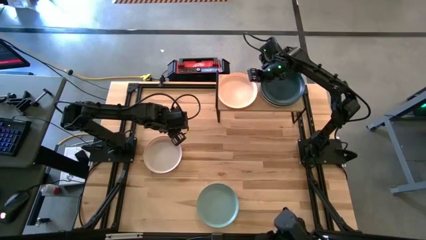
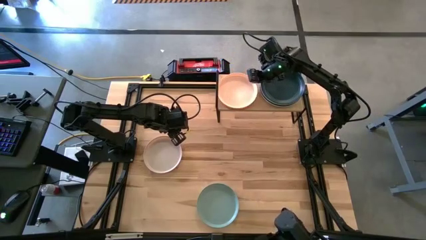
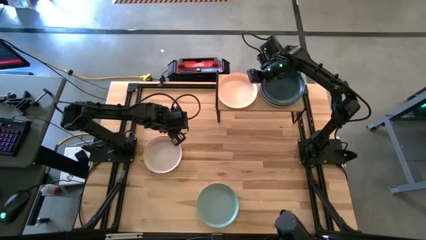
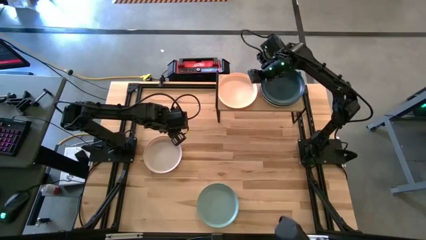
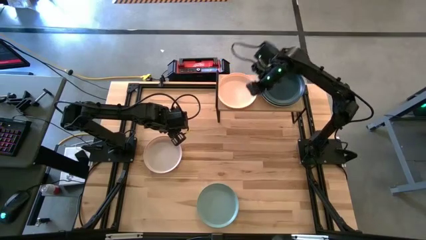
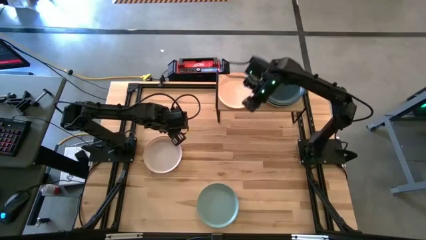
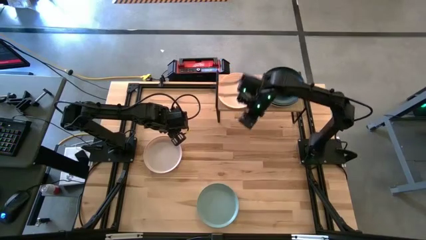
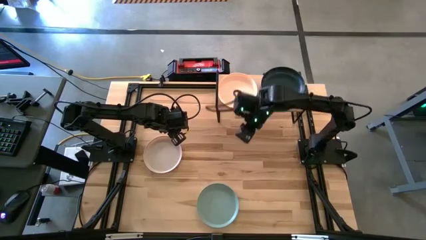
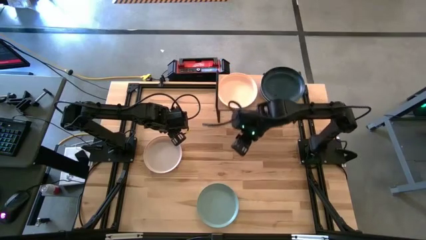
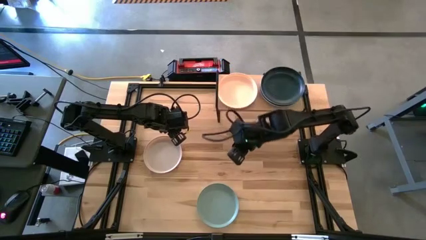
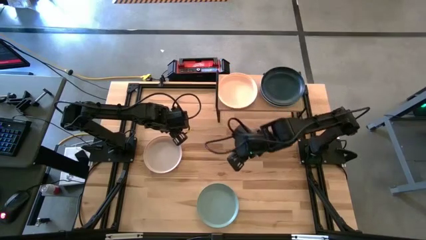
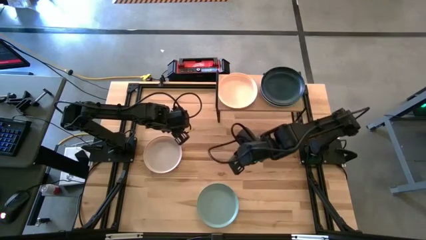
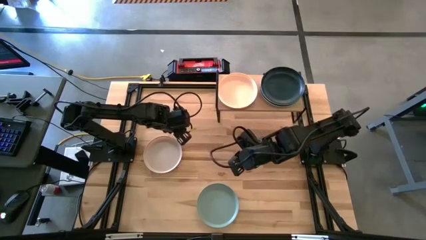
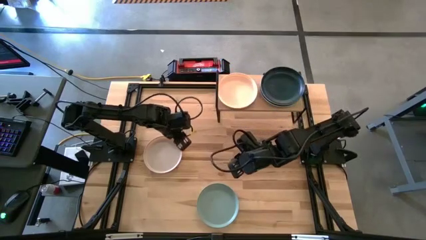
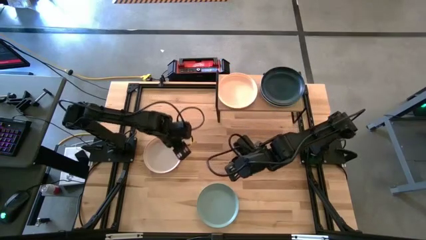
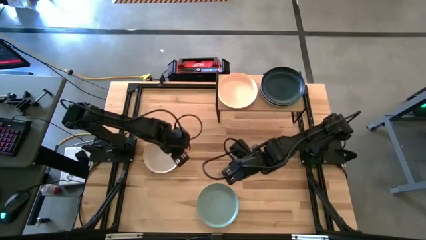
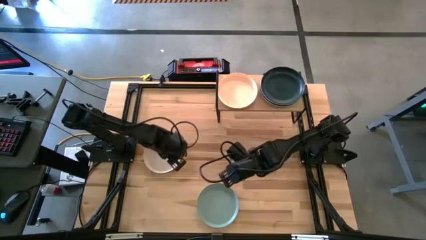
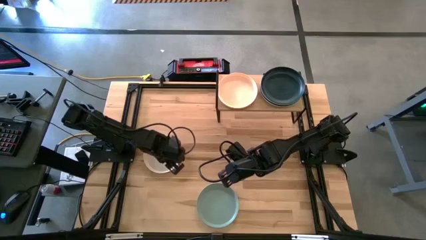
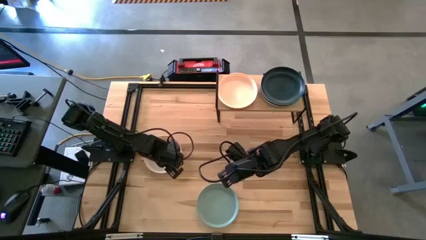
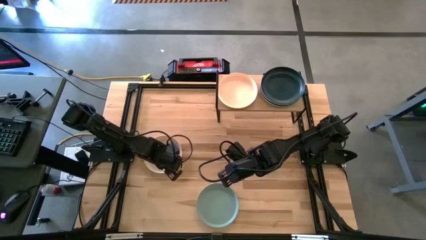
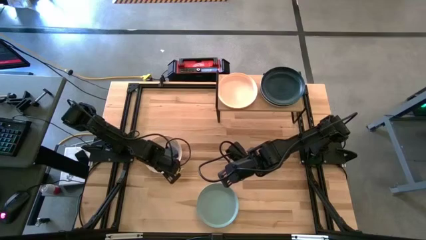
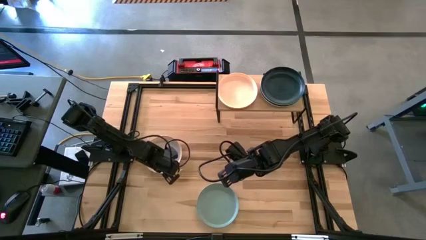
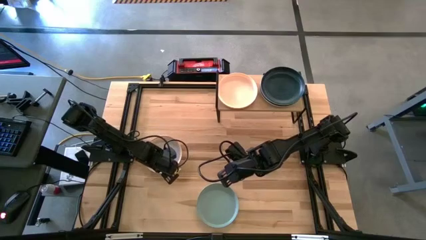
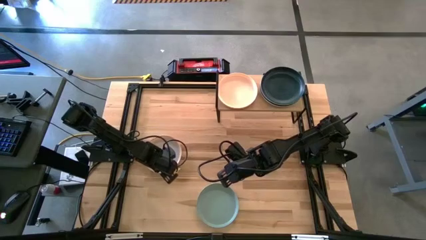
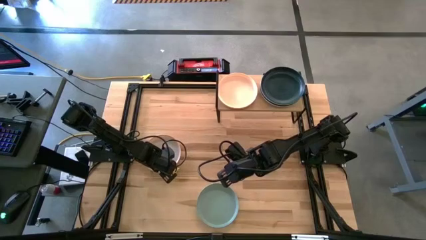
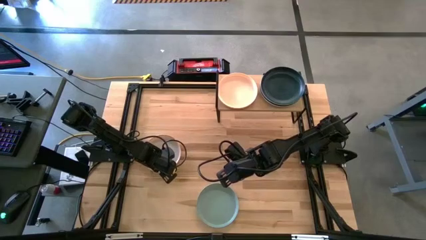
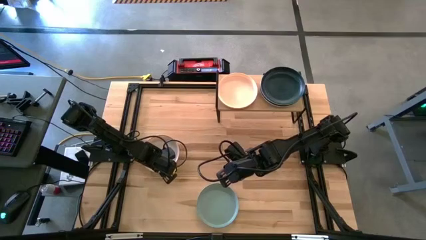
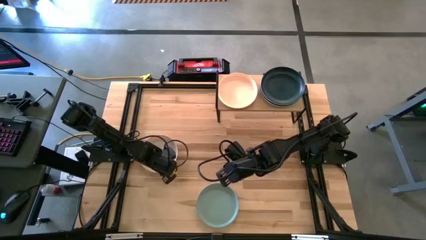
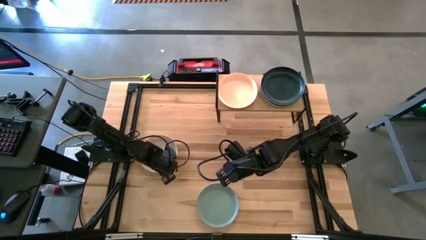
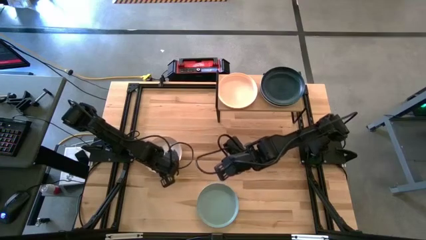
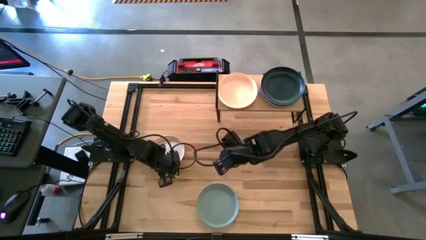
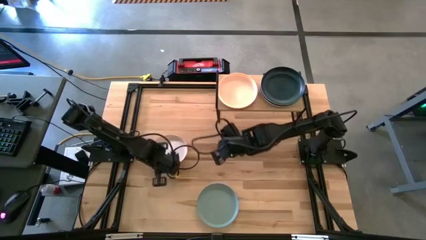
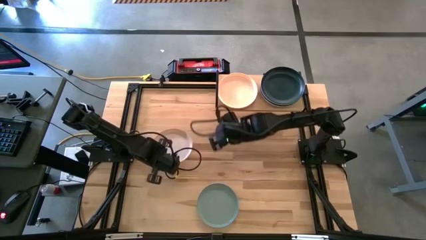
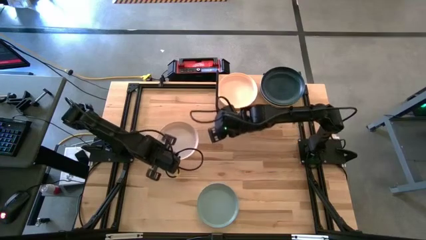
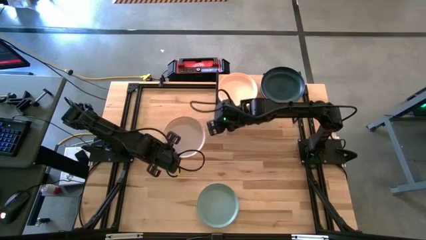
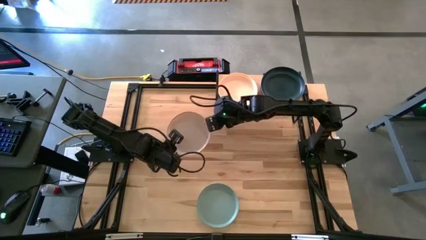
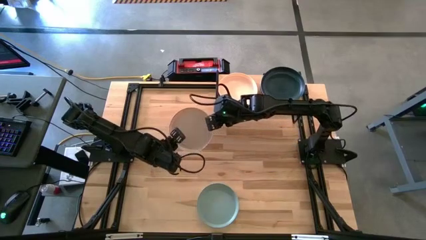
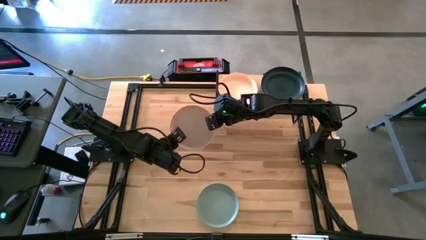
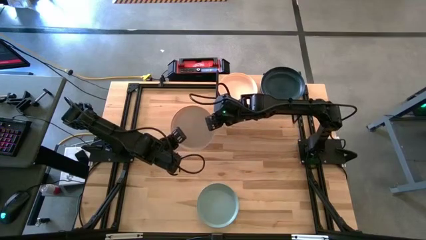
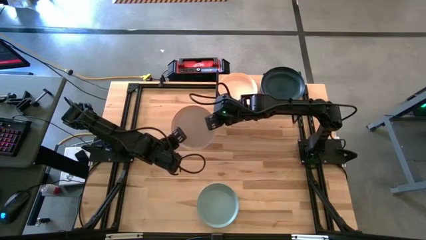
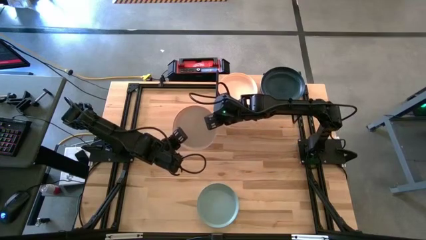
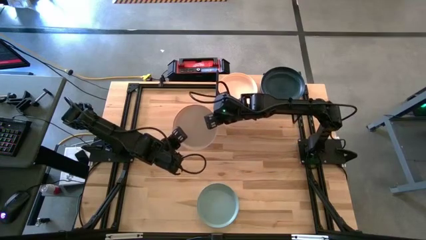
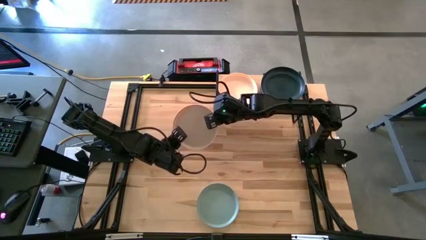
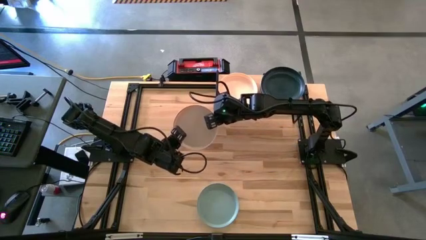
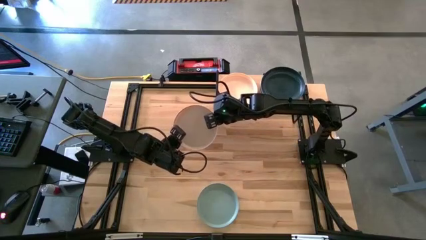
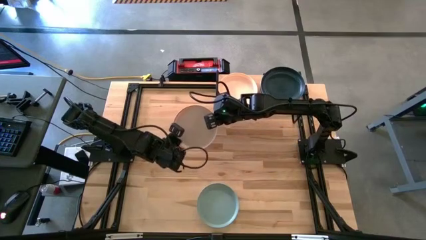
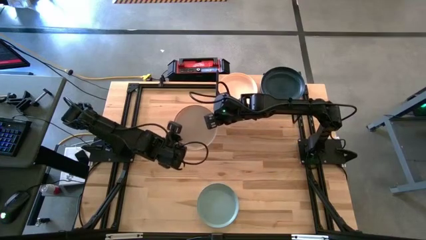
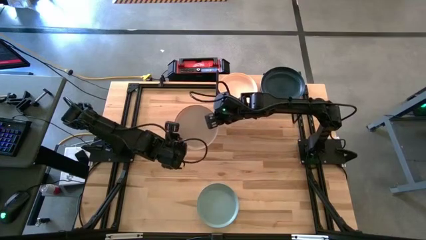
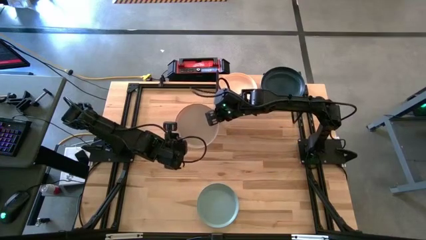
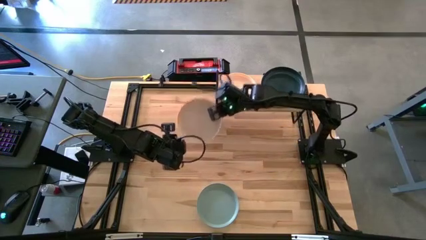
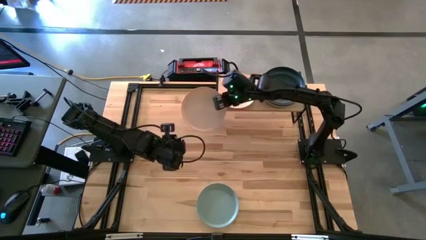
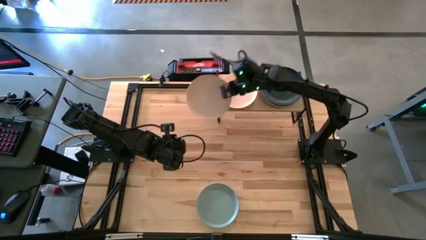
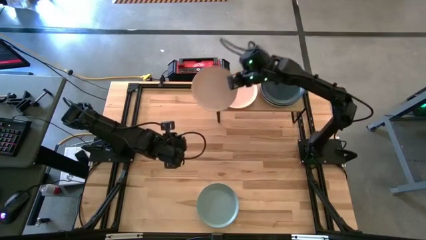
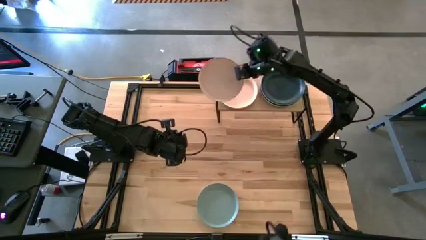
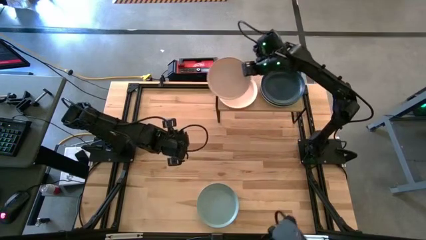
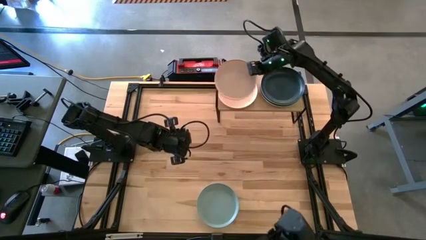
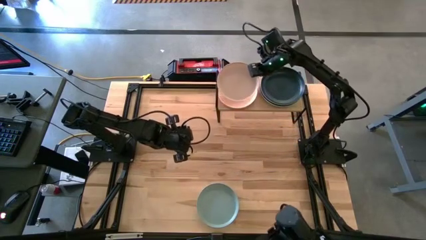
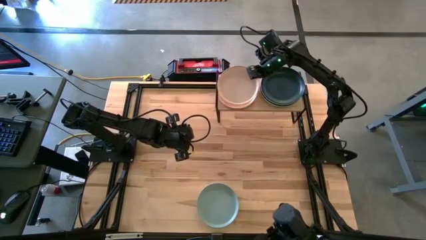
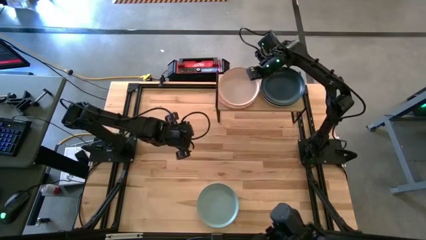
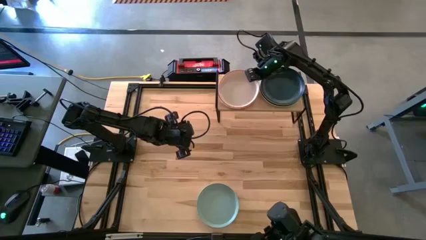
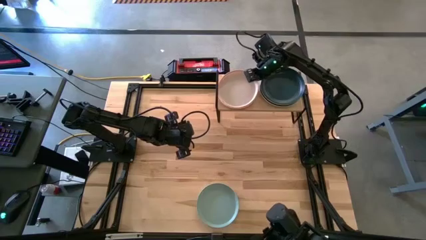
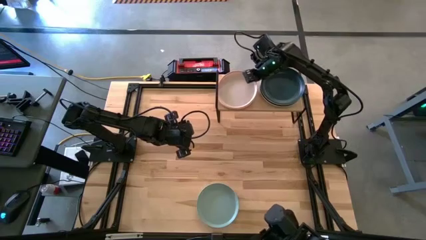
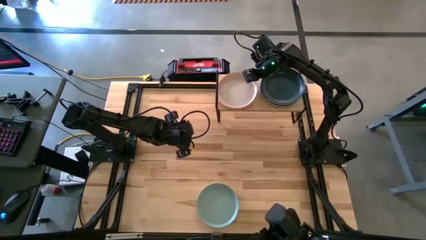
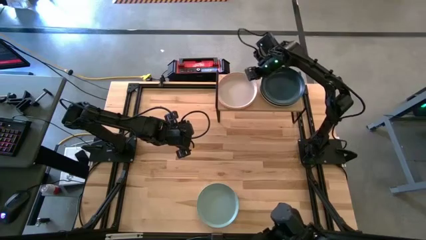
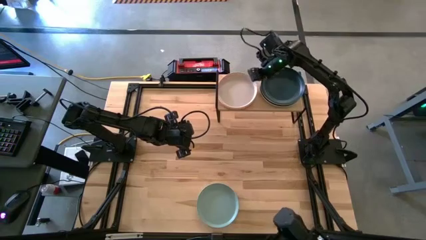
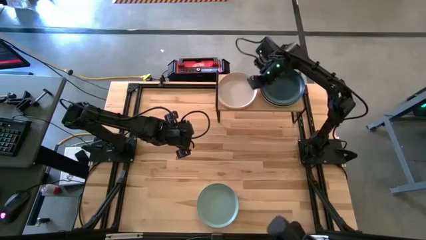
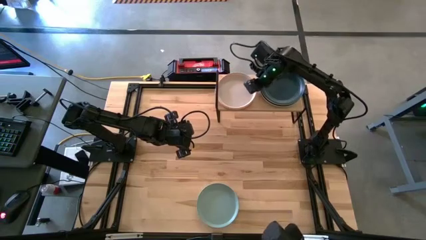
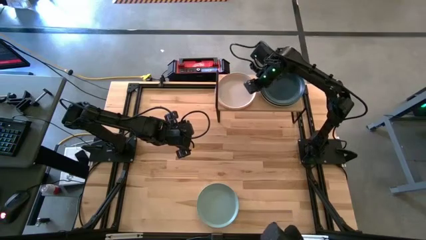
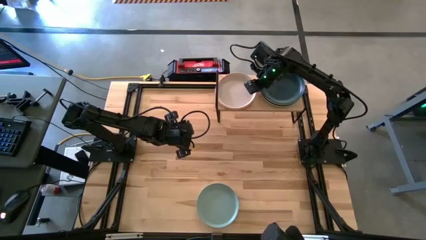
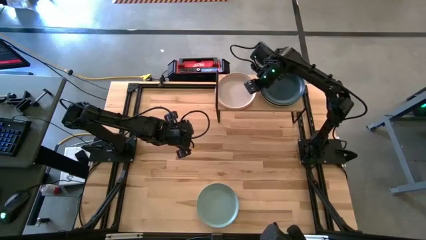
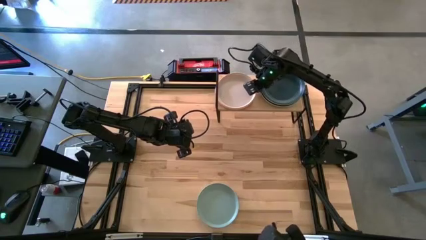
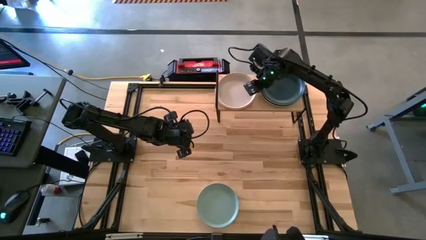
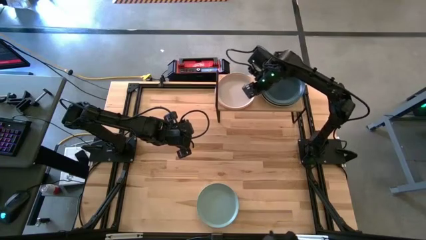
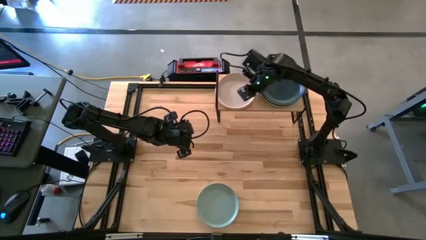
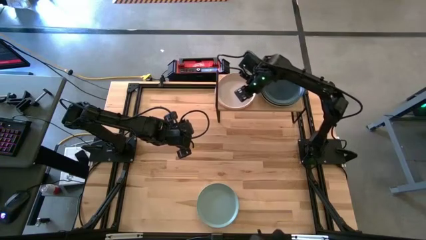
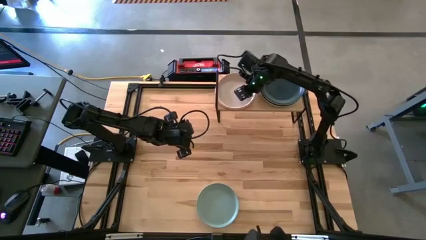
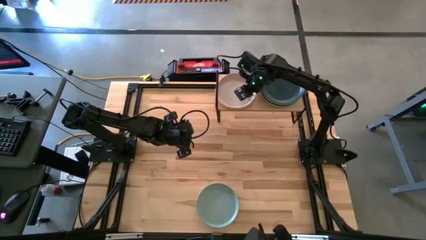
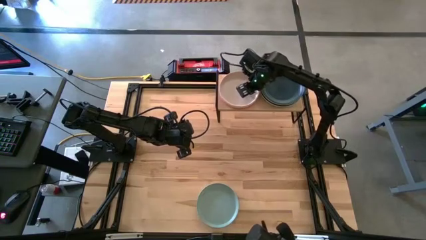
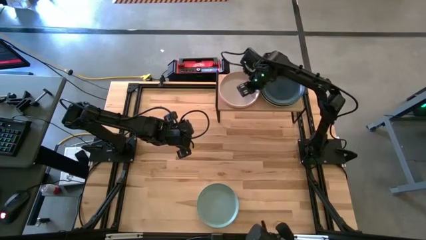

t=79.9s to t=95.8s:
Task: Place and stack plates onto a shelf
Stack the light pink plate on top of the light orange plate on the shelf

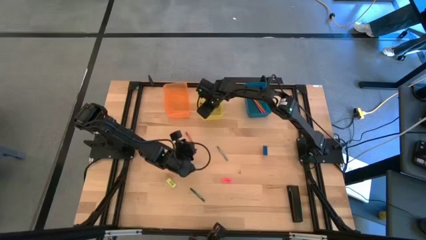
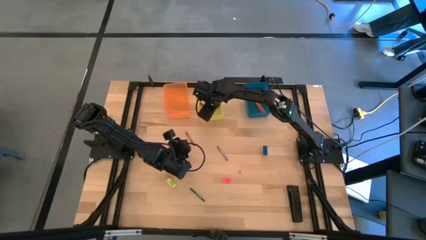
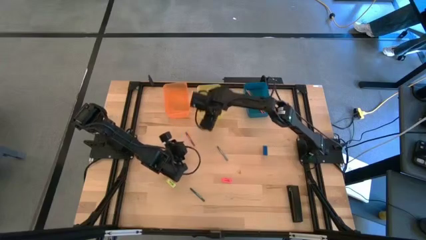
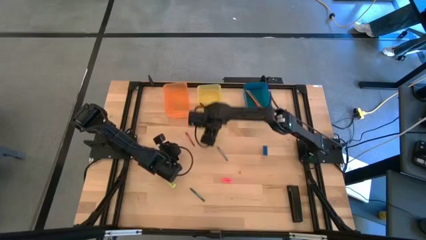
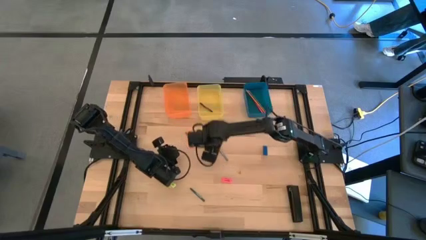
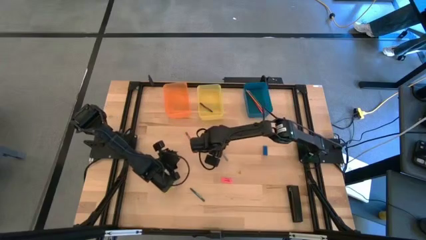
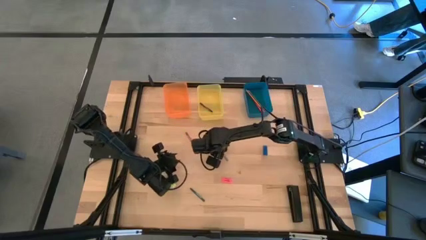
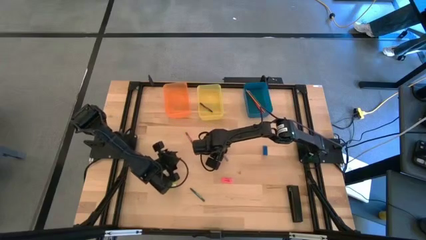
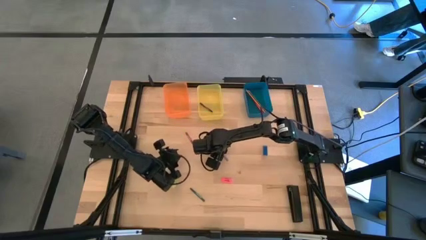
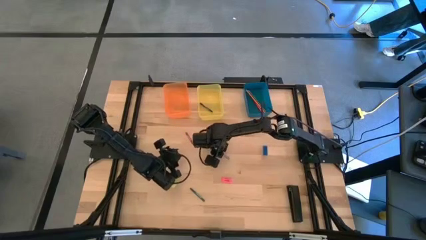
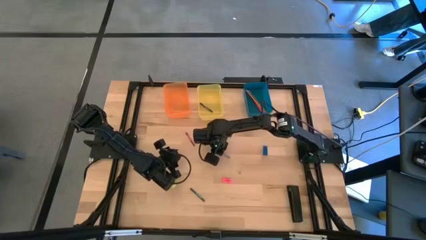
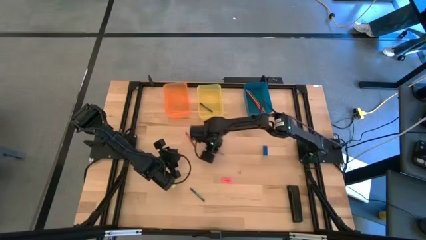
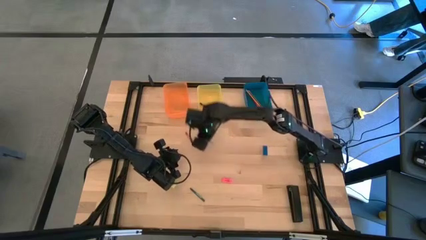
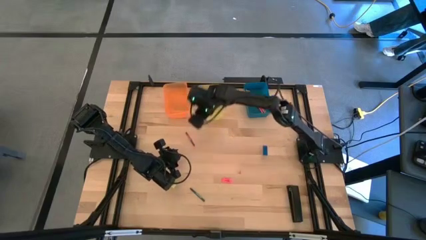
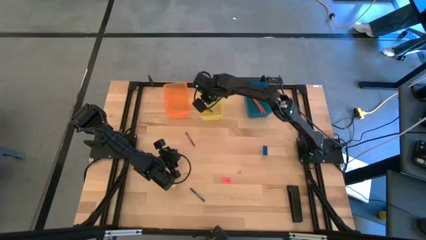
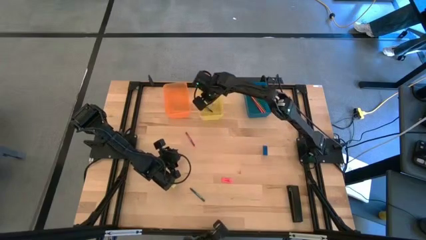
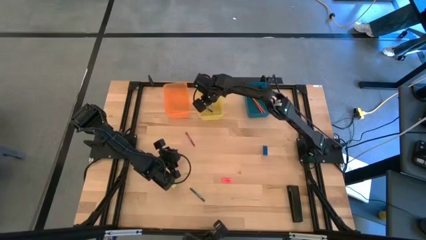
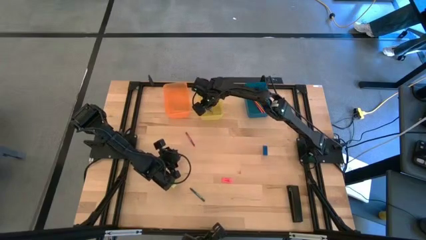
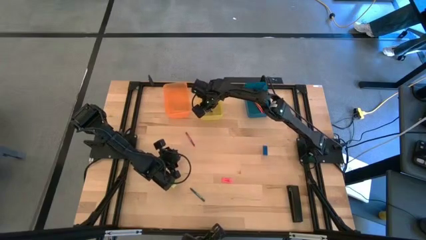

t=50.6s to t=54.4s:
Task: Sort crayons/erasers/pens/pencils in bins
Put the gray crayon into the yellow bin
